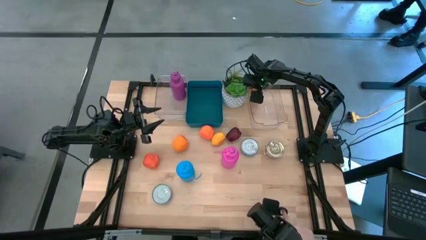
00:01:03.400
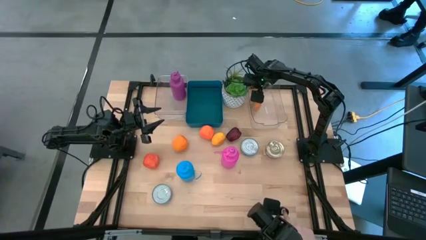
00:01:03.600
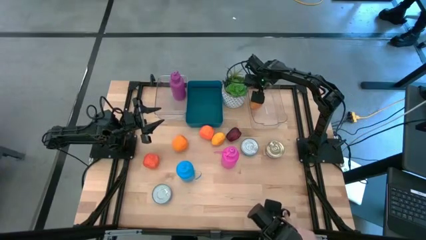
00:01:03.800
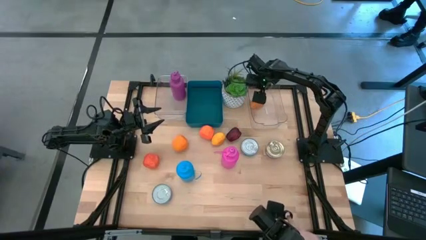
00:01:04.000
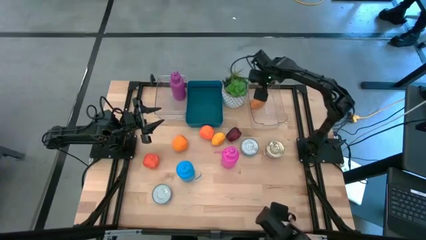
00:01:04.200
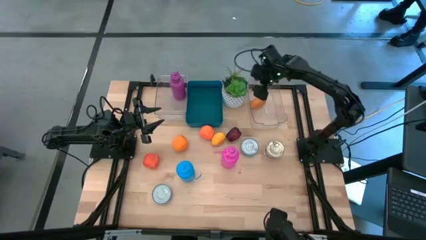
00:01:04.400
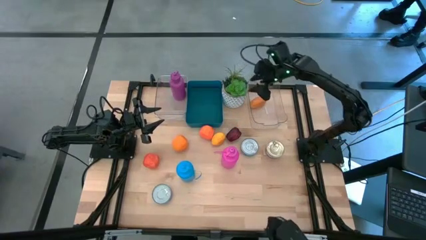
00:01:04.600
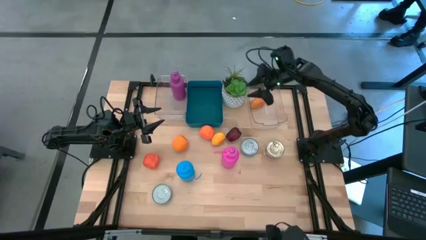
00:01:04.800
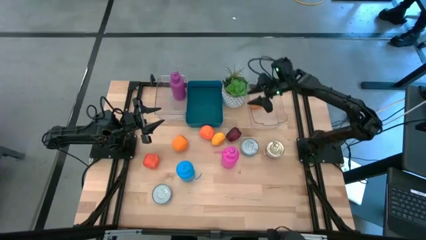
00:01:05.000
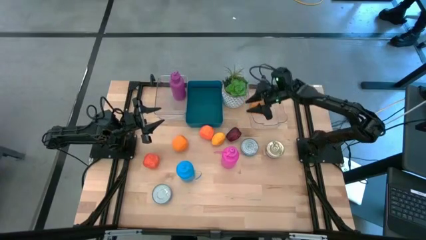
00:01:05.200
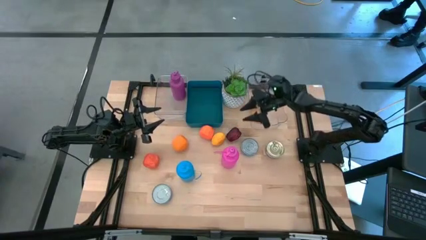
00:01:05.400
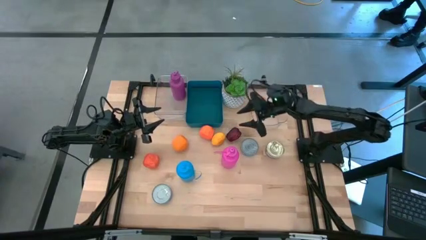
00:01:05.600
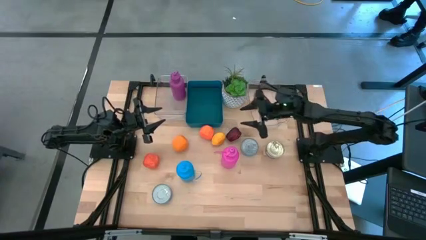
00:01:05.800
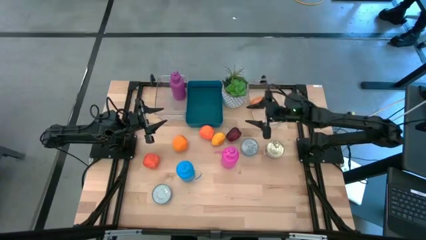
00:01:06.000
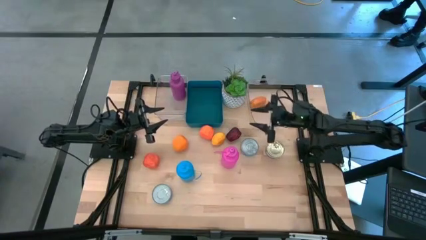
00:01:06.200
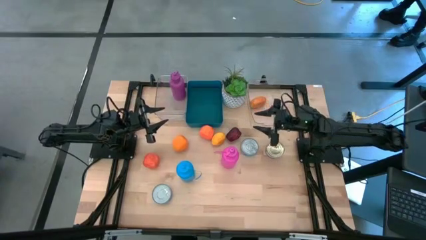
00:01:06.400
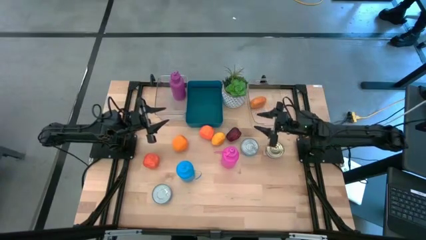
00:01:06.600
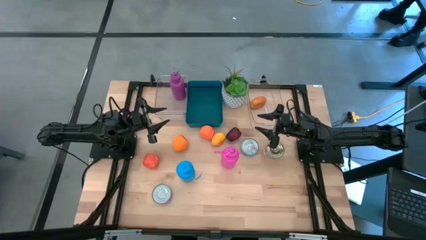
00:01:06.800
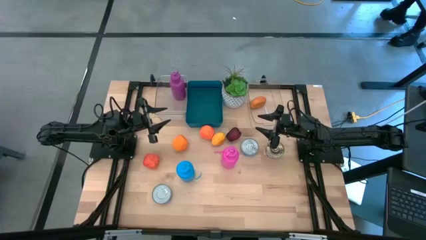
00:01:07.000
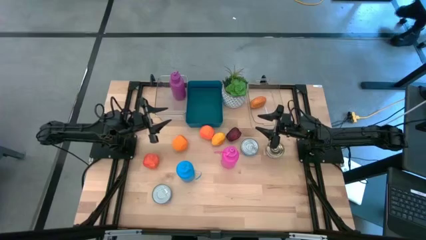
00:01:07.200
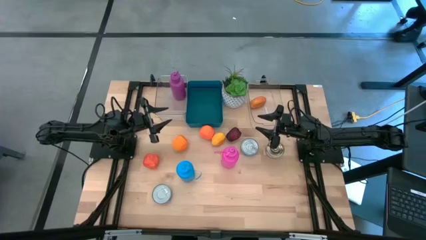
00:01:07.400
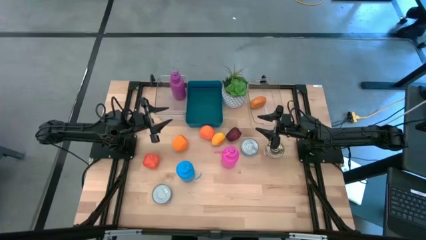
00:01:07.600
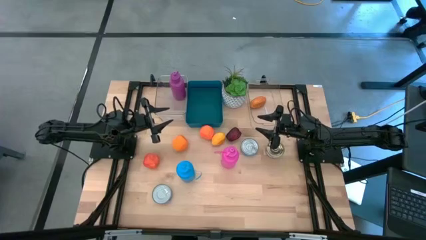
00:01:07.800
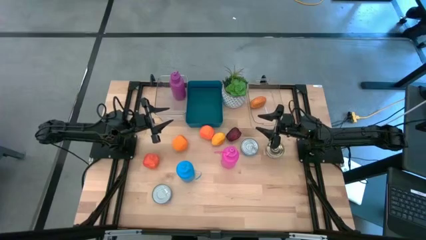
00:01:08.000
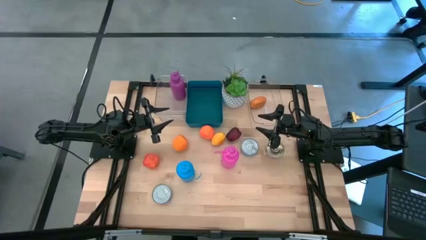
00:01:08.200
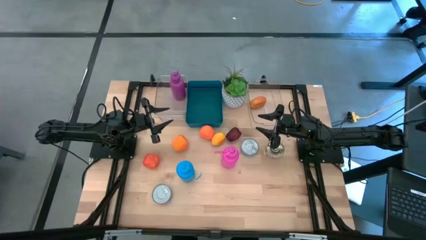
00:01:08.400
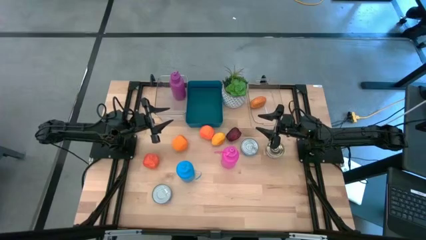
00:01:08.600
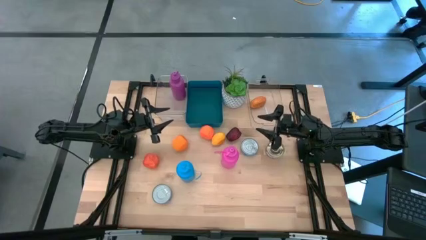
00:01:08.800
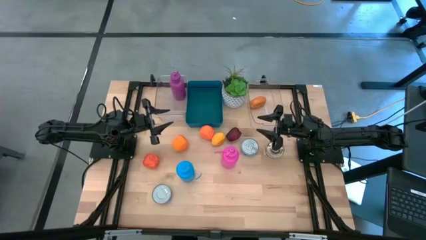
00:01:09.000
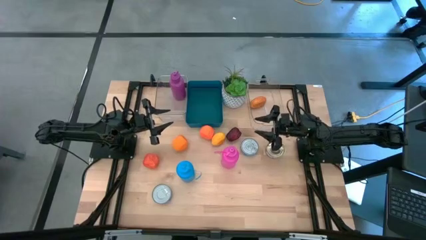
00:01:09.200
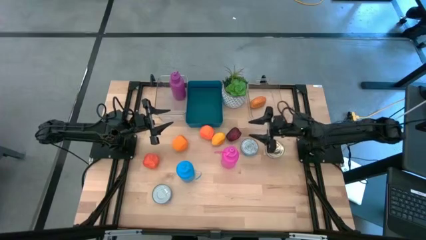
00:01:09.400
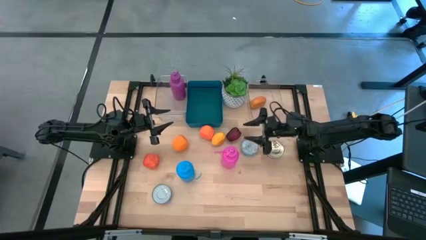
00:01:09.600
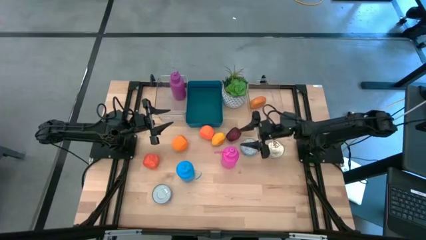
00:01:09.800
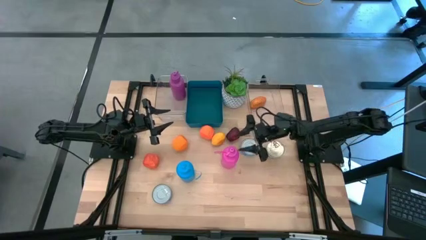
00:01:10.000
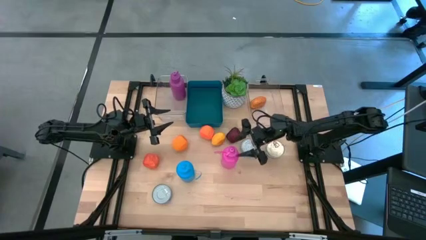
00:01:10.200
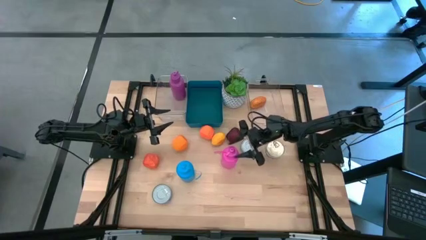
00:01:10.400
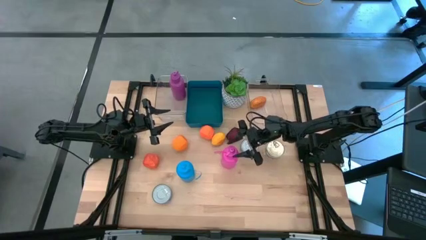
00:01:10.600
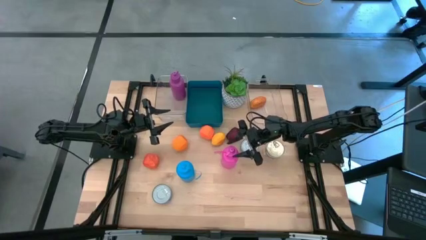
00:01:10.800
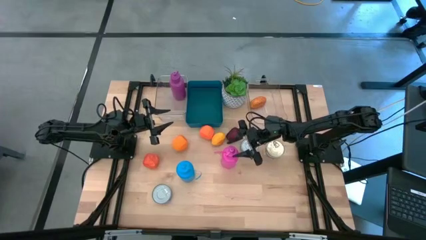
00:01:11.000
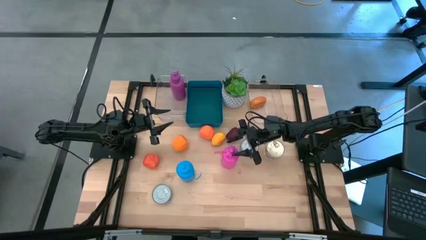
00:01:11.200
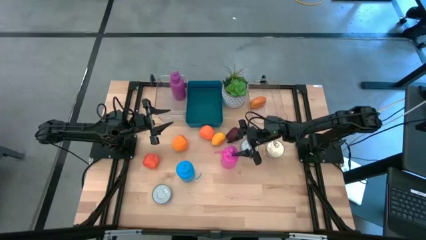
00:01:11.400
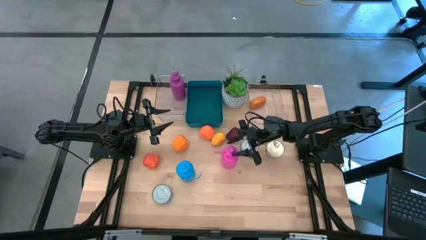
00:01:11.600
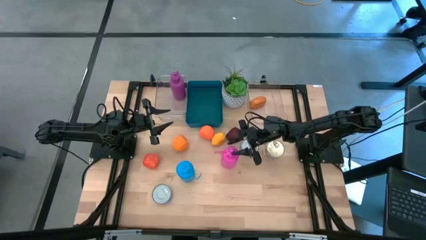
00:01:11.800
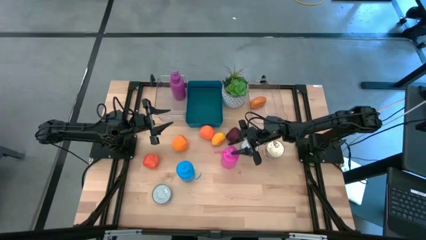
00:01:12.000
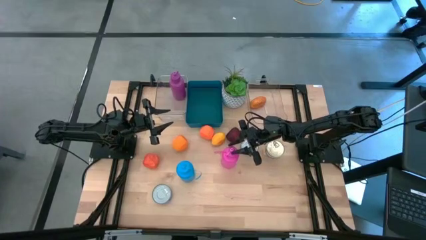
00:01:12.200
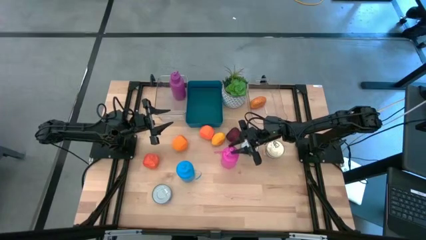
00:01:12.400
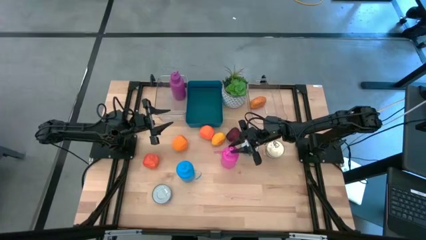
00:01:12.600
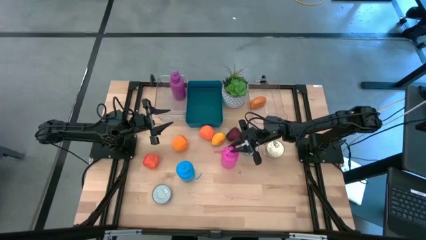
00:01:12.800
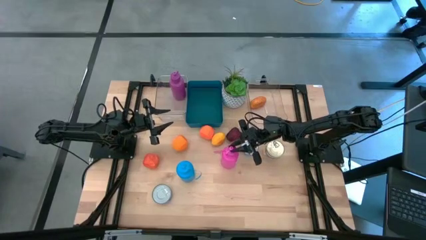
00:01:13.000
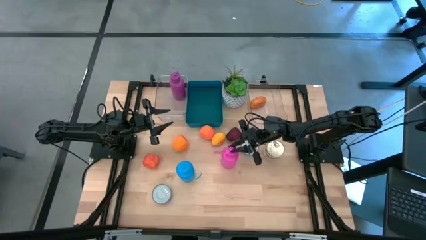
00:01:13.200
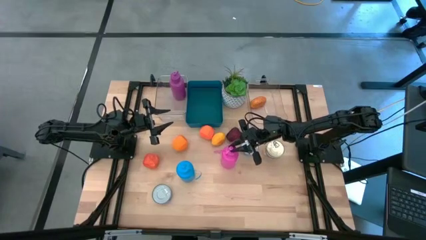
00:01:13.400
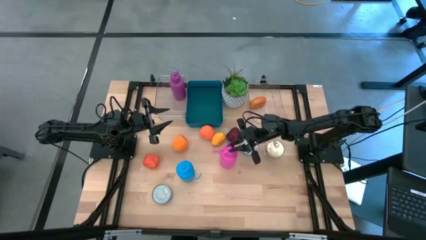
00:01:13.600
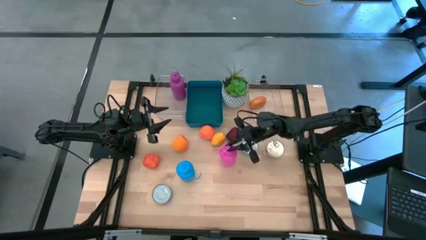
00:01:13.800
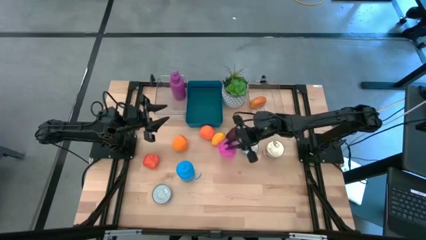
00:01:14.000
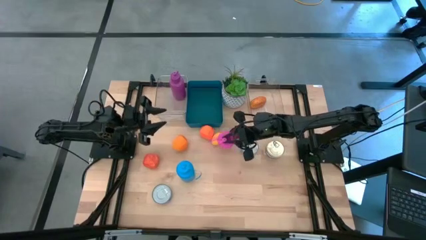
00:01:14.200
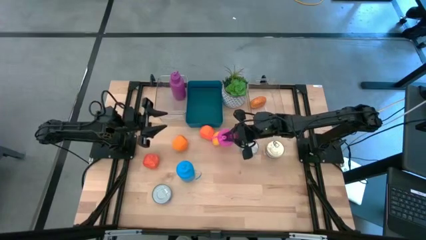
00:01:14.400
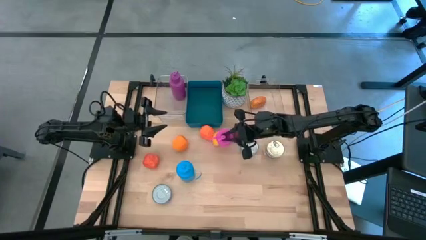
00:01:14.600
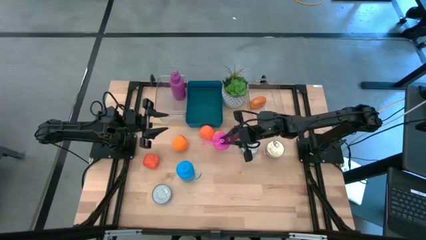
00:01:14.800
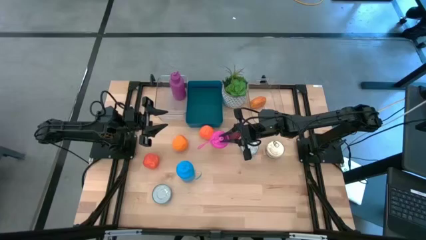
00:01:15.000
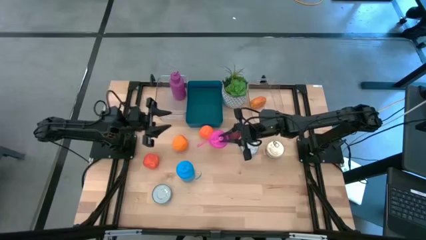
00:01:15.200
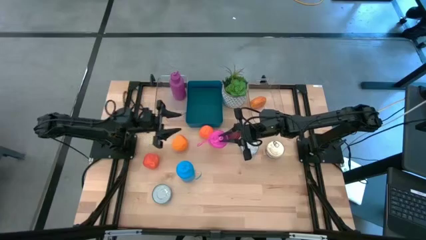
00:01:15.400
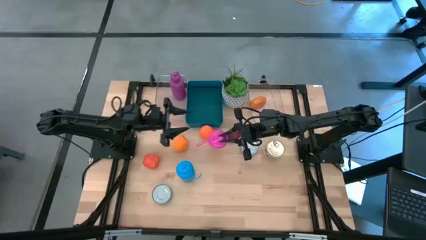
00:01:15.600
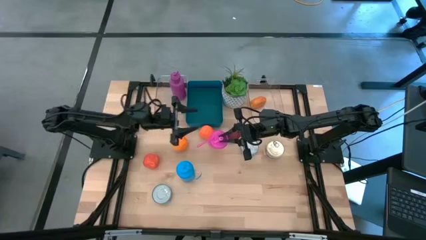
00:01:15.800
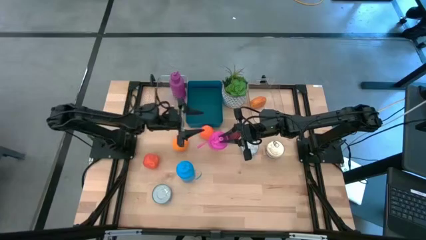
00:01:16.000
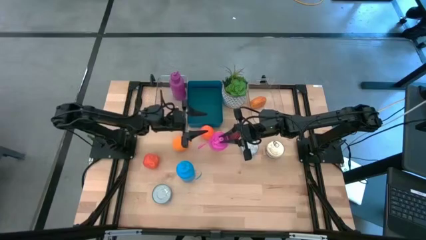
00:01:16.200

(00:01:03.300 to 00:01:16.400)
Task: Pick & Place Food Item
Put the pink water bottle into the left transparent bin

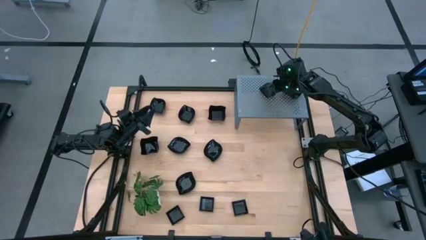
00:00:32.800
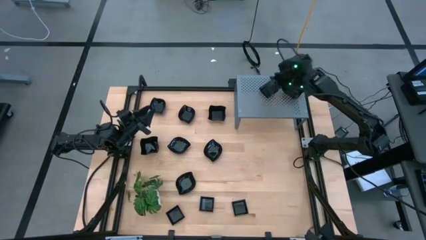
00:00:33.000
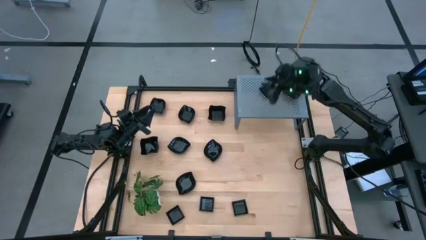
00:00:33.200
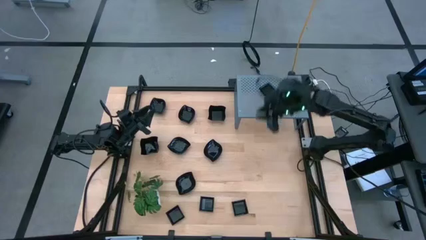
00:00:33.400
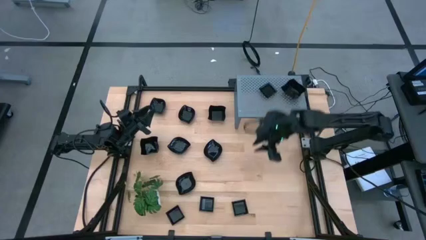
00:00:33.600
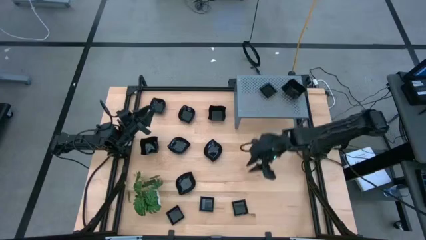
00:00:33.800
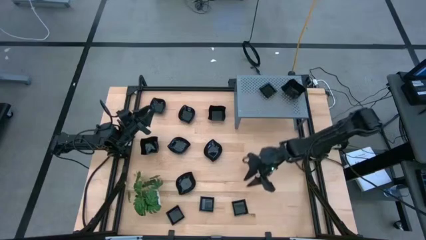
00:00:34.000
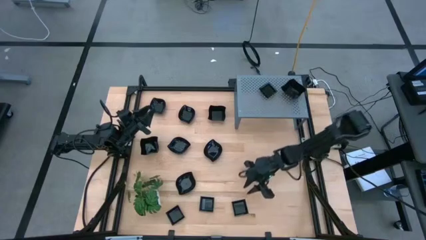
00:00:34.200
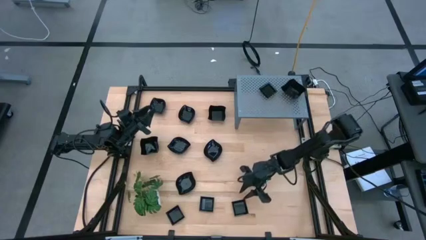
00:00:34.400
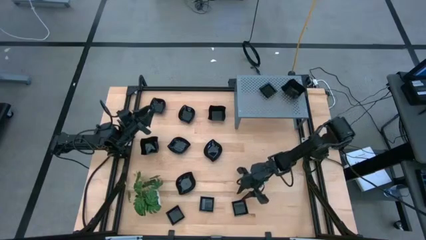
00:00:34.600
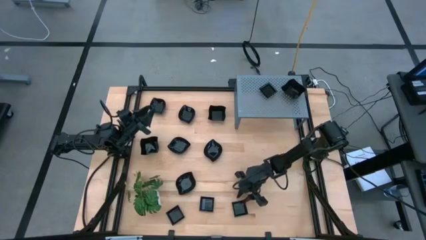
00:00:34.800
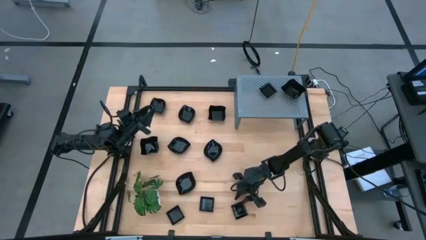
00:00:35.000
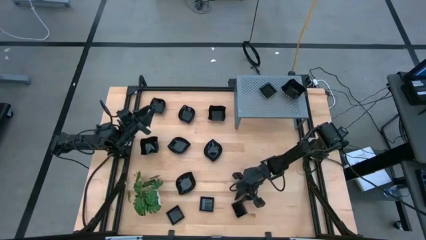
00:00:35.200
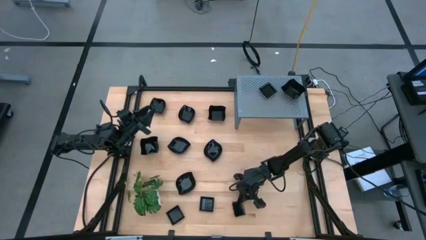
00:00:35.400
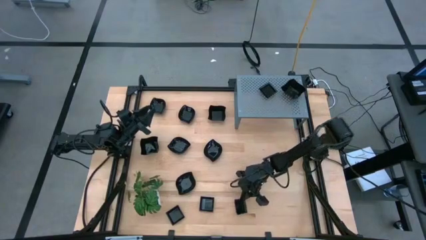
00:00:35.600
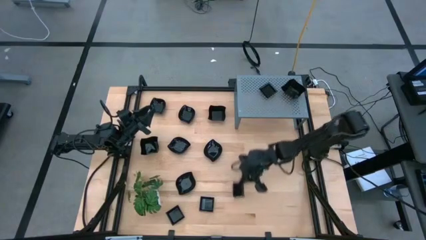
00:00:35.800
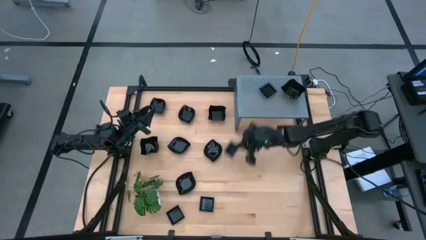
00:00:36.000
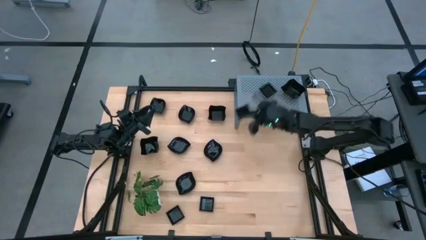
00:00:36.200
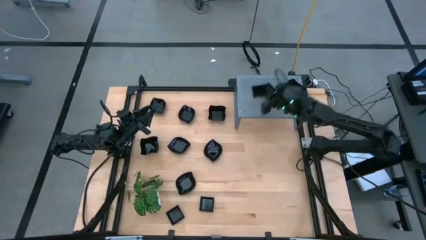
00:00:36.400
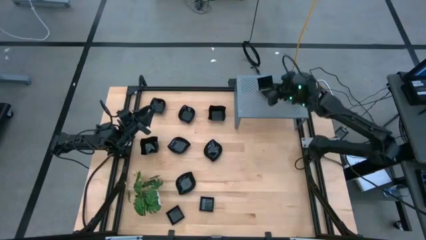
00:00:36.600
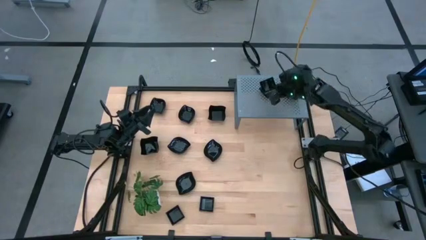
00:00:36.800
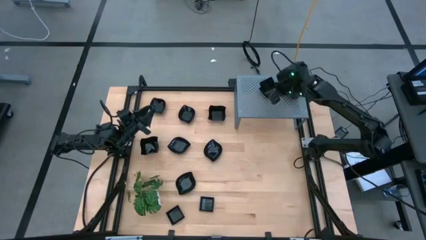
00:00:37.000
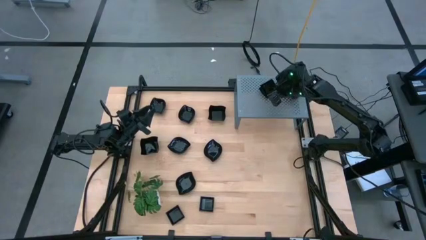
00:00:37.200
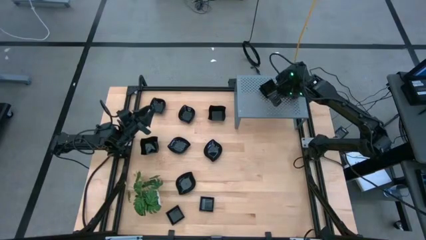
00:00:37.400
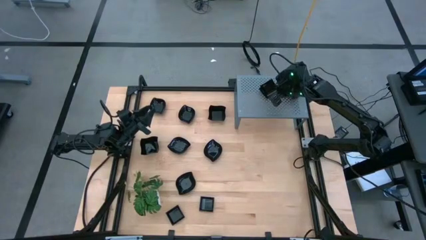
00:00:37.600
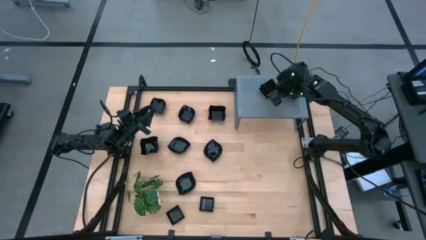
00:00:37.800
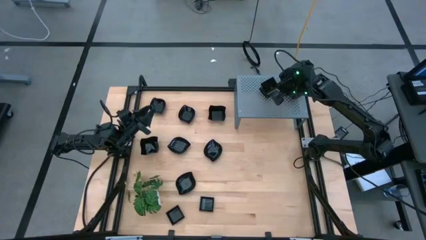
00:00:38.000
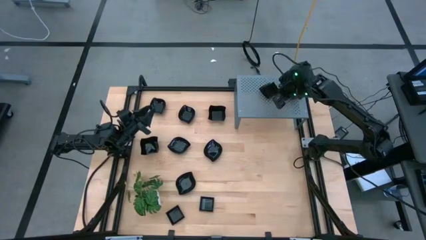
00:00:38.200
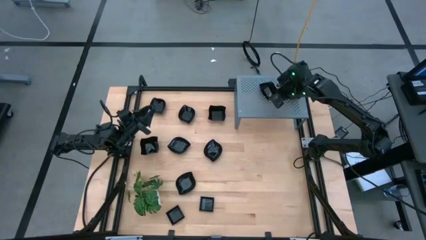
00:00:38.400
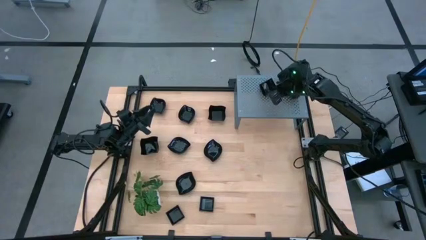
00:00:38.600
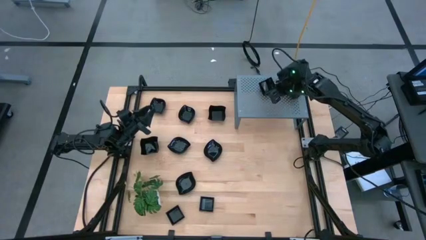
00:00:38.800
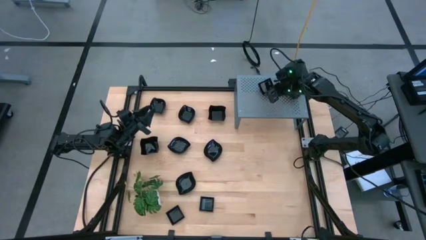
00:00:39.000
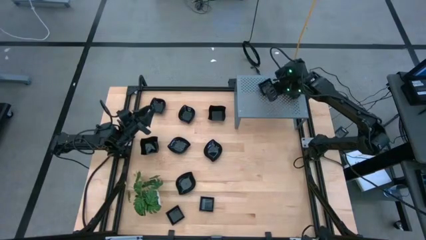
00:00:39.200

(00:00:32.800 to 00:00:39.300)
Task: Pick & Place Mini shaped plates
Stack the square plate on top of the other square plates
